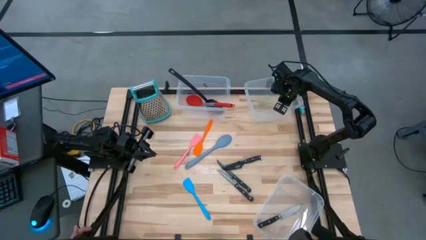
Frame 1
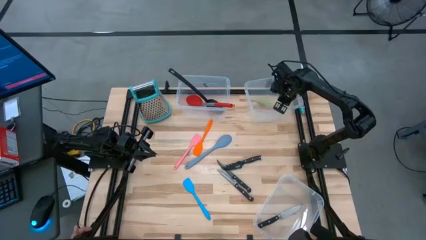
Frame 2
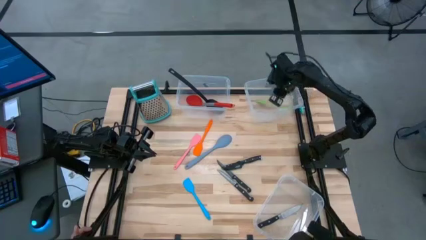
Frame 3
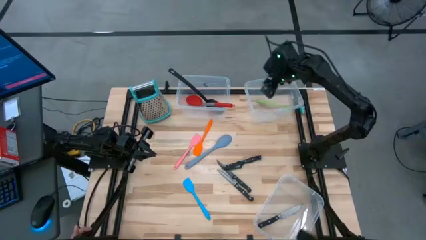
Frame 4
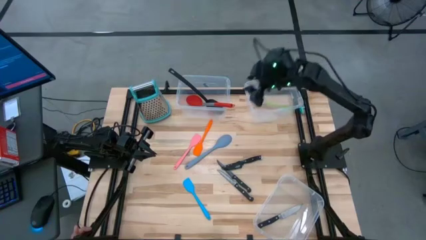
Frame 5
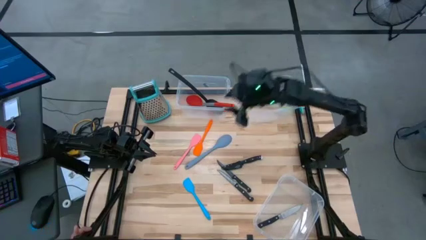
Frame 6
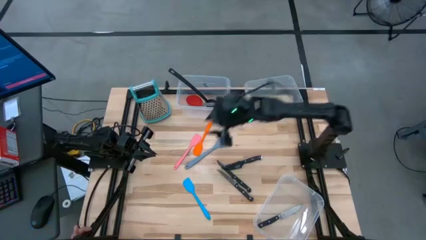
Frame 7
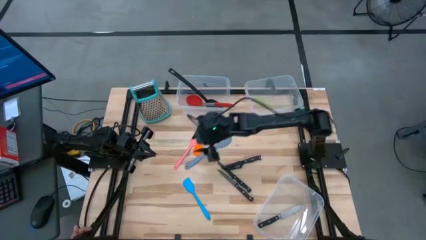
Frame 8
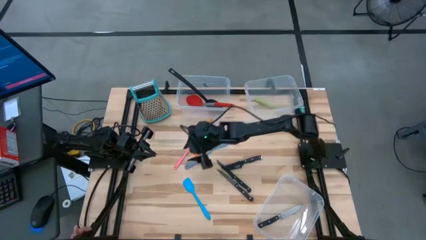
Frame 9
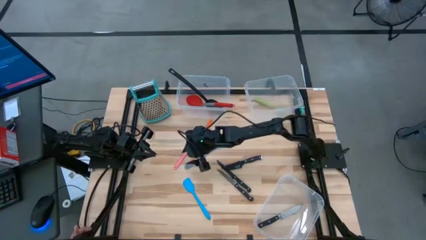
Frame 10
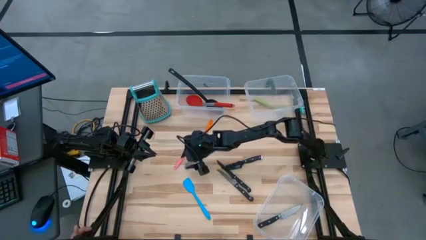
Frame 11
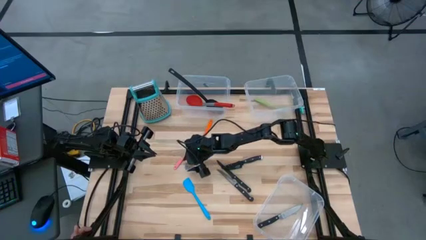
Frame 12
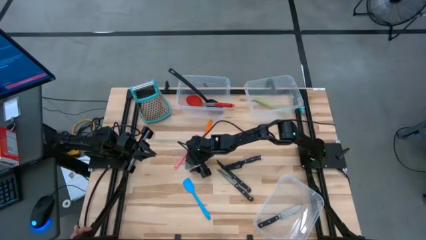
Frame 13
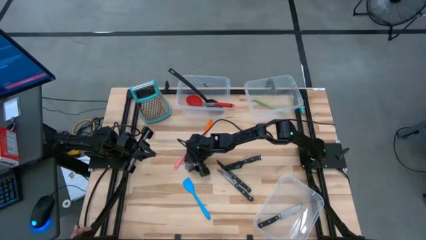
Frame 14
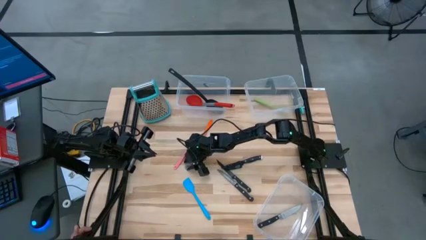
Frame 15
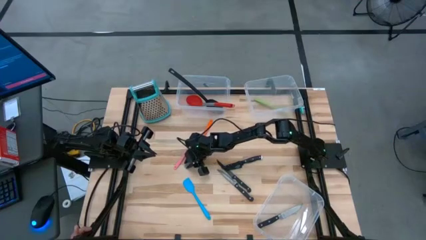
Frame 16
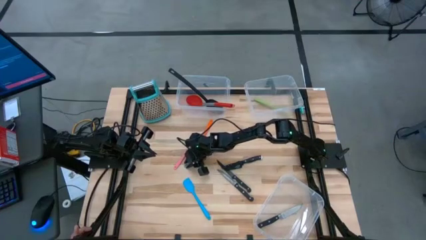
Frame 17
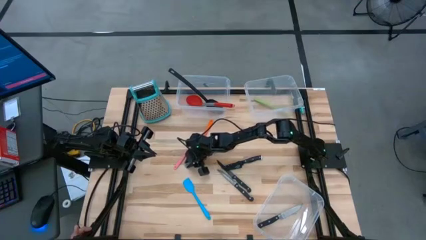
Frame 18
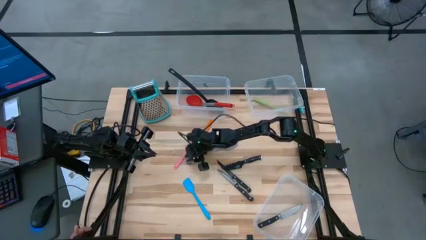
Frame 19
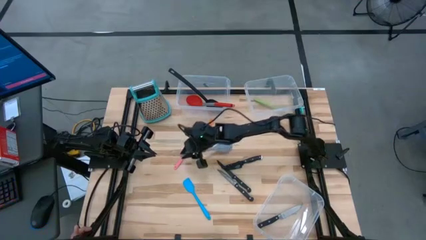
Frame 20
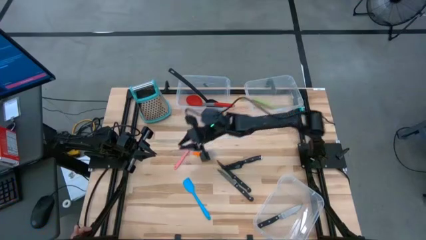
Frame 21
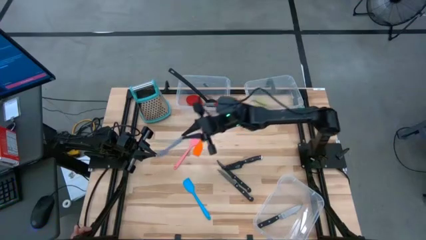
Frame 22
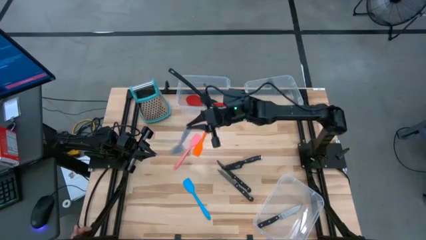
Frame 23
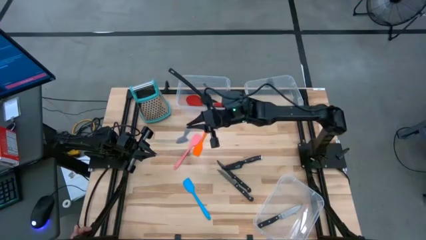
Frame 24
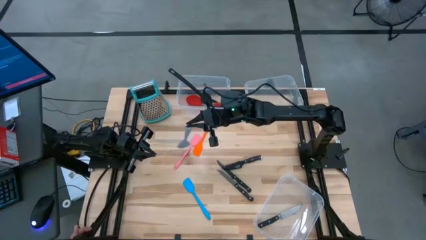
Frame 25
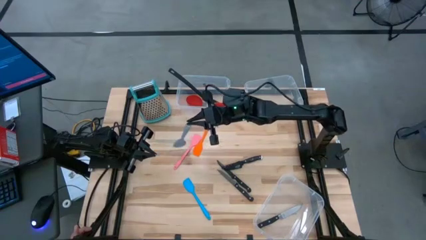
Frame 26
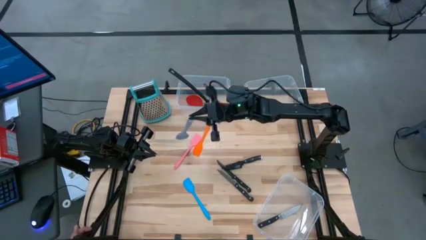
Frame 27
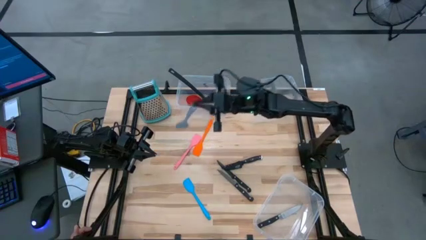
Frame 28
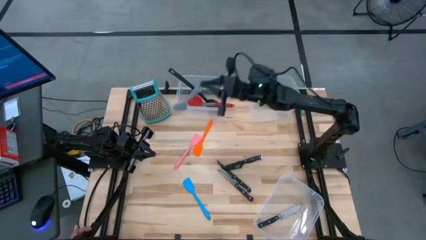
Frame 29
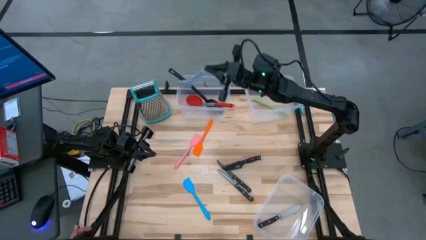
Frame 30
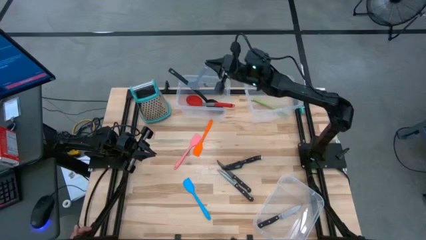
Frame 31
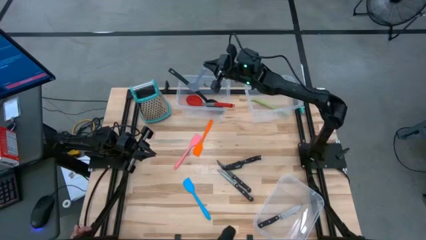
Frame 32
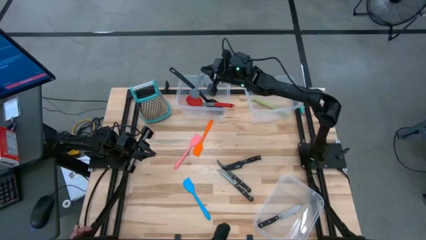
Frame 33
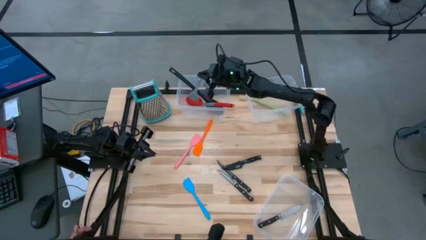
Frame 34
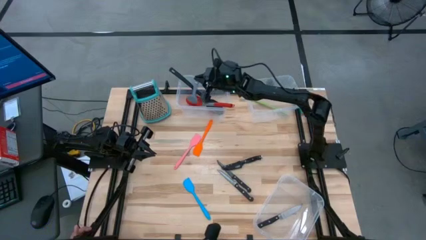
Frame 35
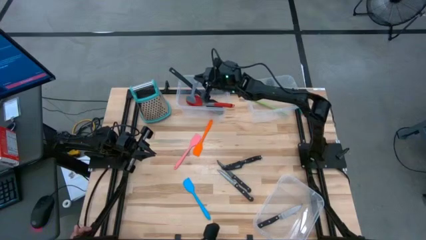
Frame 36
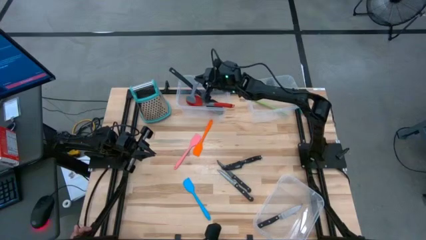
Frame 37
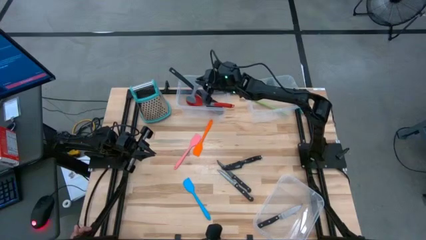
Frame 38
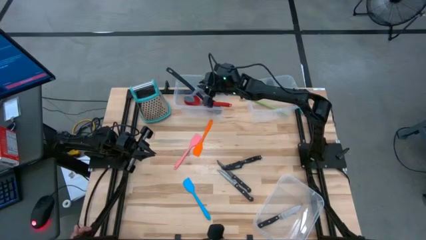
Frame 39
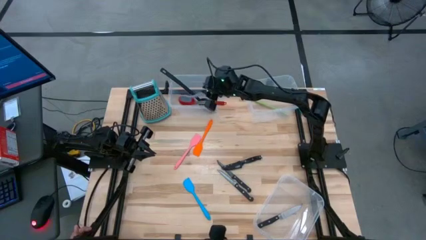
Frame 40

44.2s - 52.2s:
Task: Pick & Place Kitchen Items
Put the gray baby spoon into the top left transparent bin
